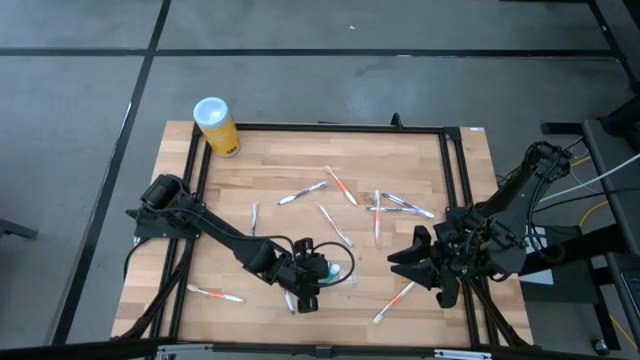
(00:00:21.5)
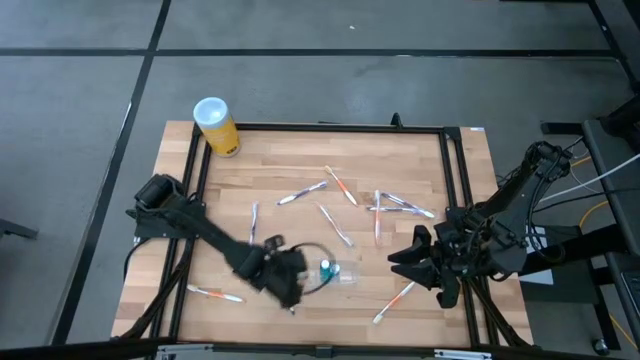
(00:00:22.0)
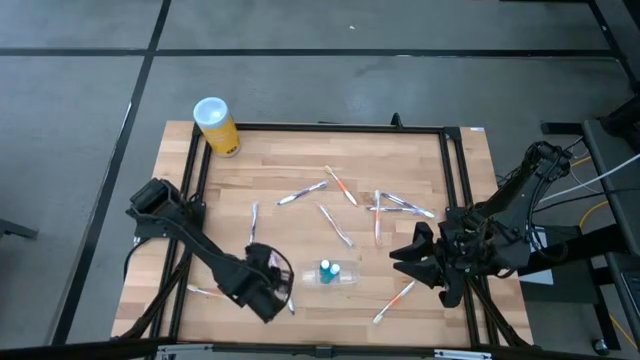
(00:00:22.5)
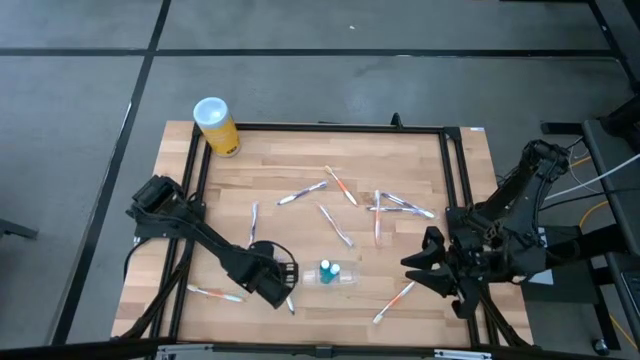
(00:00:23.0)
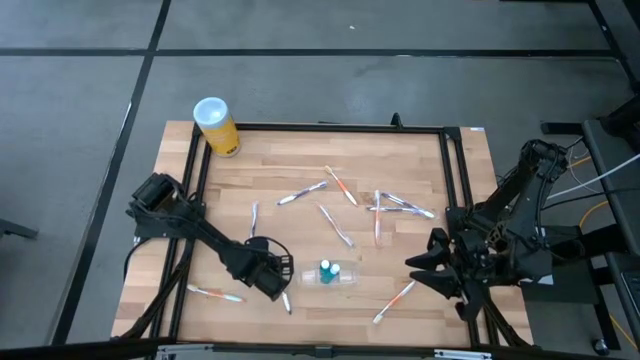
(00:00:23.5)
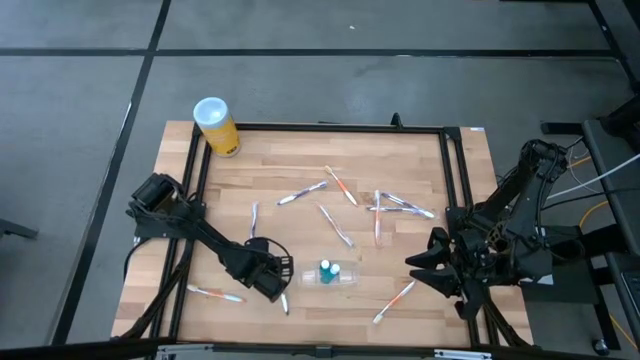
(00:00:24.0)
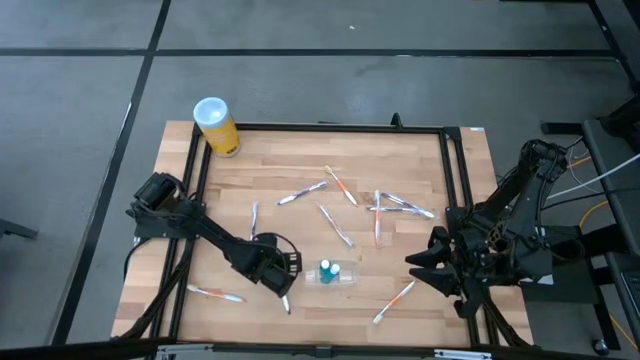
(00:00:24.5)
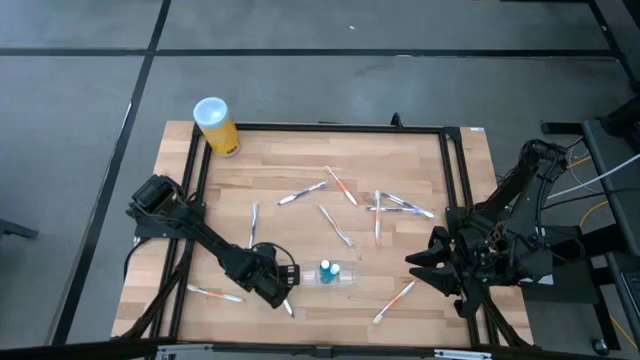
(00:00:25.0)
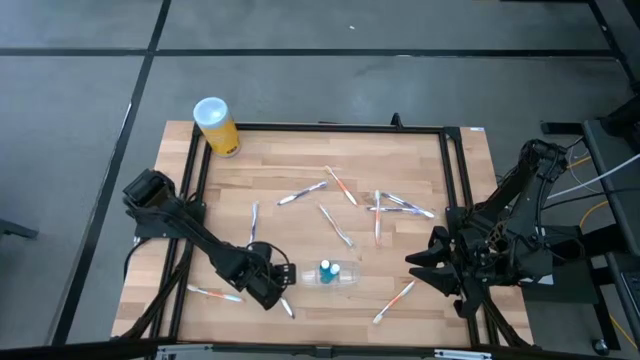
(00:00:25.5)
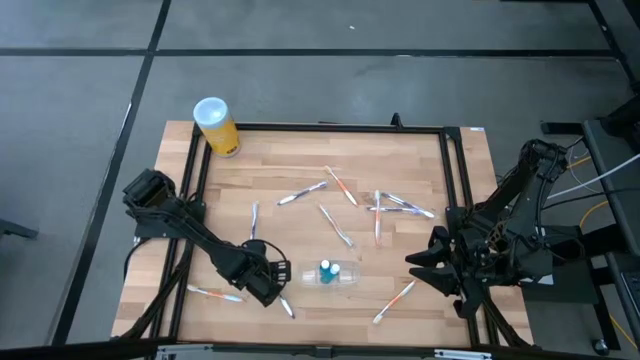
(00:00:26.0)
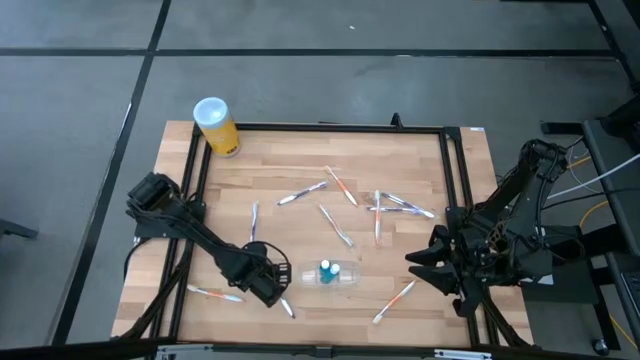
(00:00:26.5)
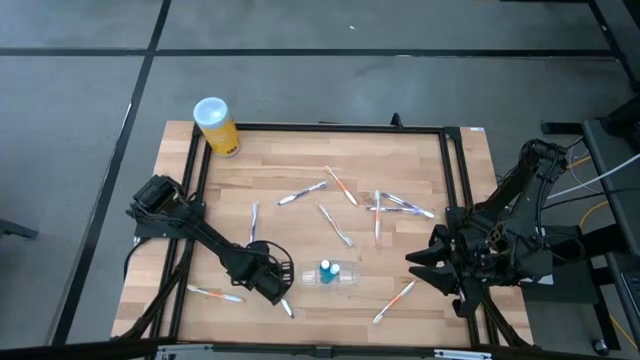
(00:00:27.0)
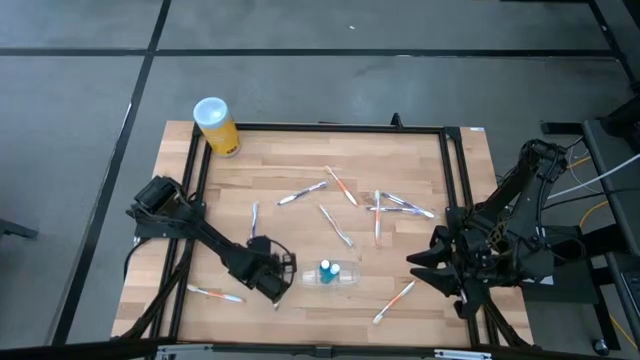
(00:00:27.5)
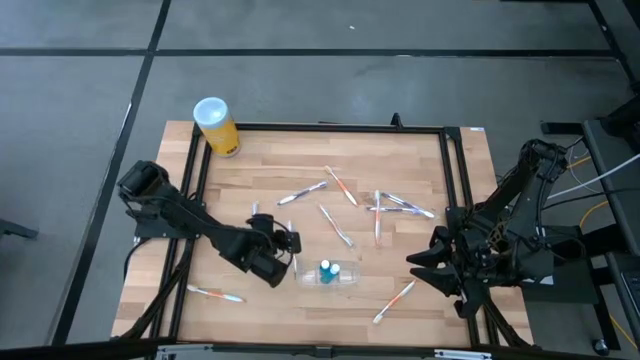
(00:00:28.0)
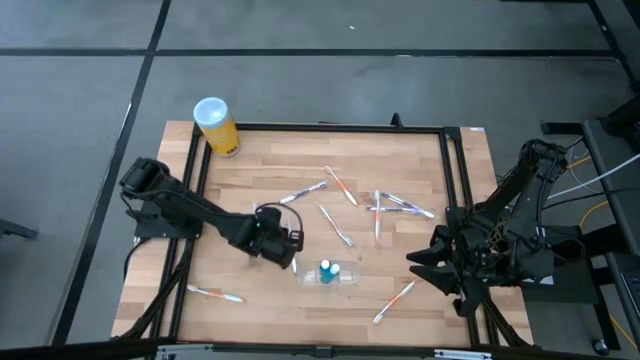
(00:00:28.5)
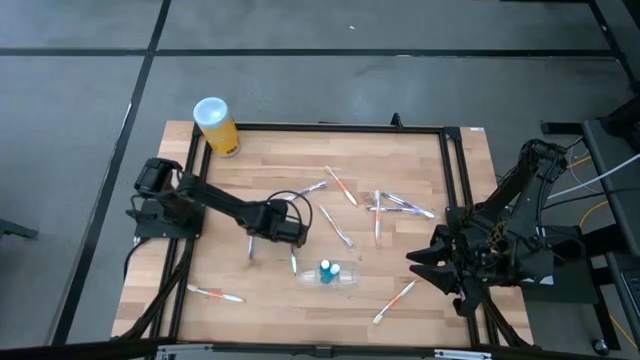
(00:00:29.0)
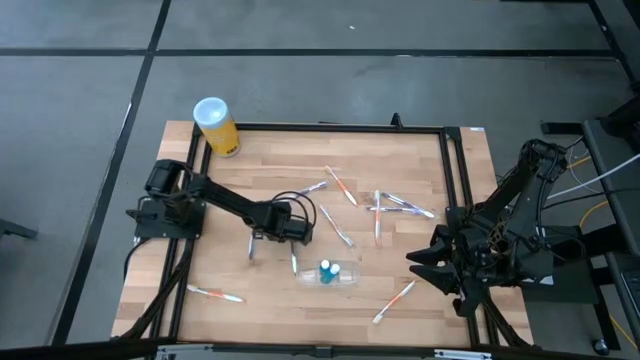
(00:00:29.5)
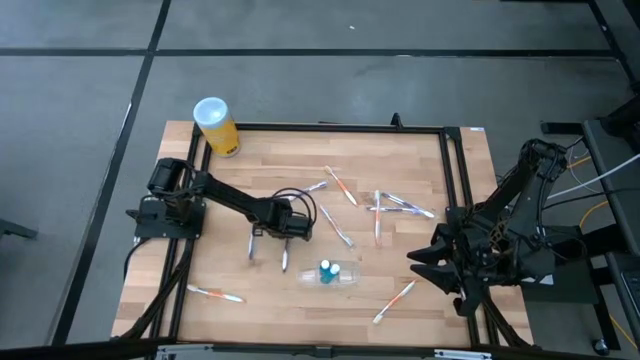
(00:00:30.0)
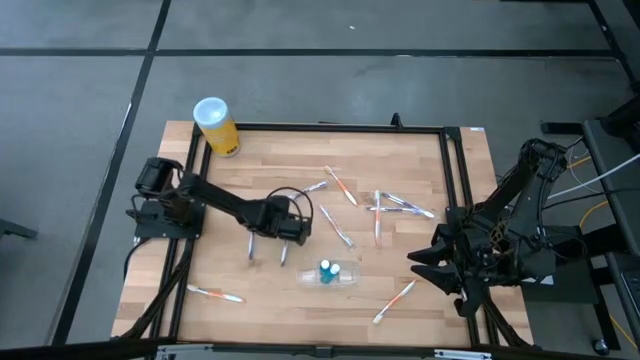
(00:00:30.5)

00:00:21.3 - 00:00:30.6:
Task: Pick & Place toothbrushing station
Put the purple toothbrush into the left section of the transparent organizer

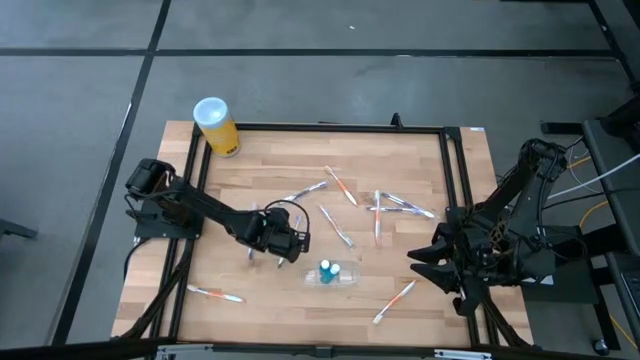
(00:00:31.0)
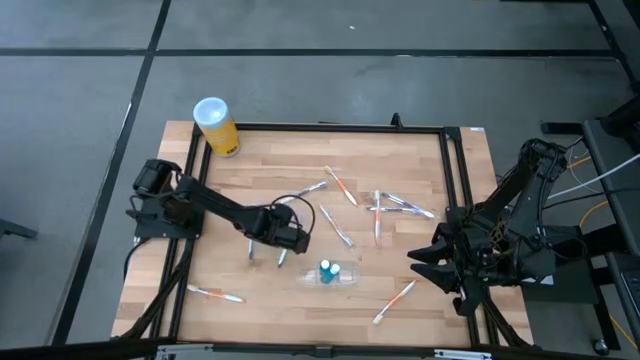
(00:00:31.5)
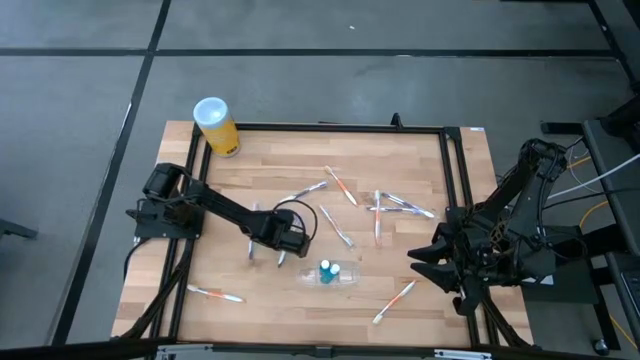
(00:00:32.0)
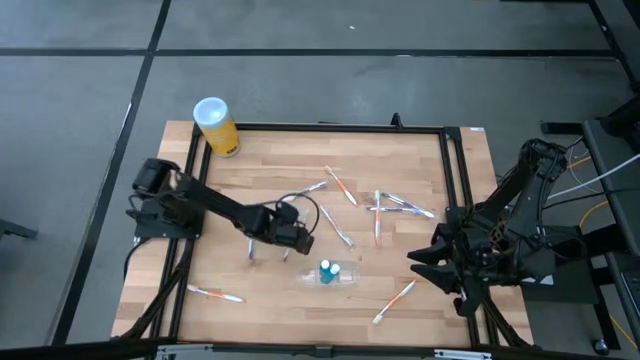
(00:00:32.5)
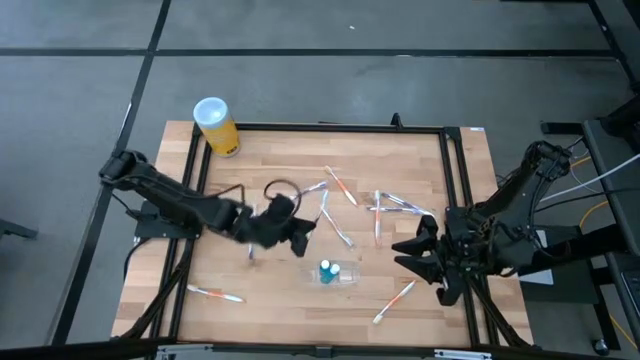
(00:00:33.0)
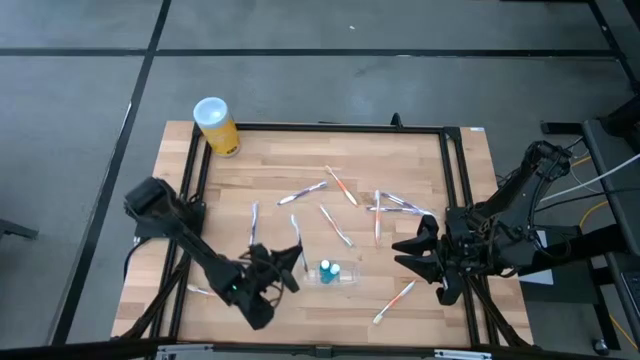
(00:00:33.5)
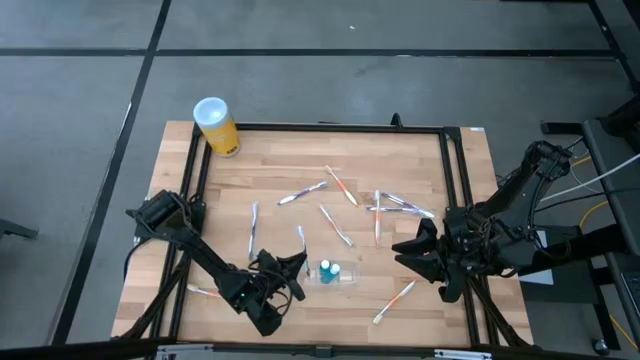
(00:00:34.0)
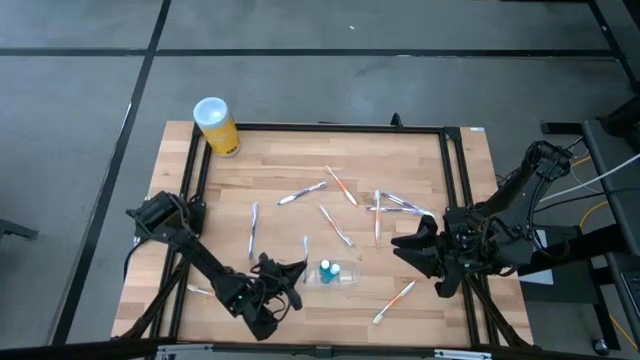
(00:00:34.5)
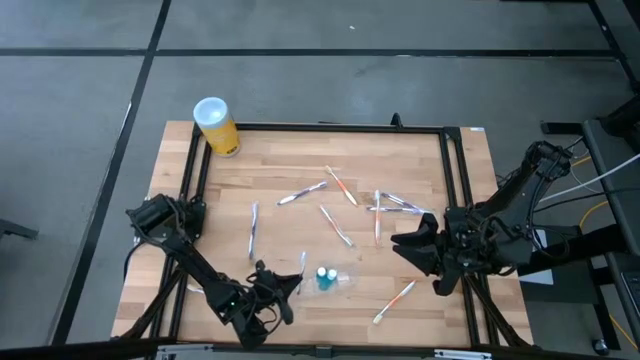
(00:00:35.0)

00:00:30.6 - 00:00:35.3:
Put the purple toothbrush into the left section of the transparent organizer

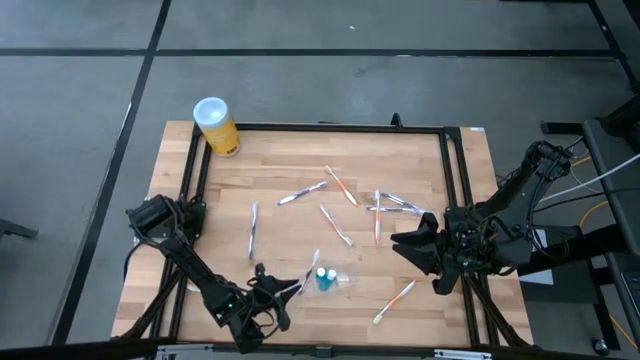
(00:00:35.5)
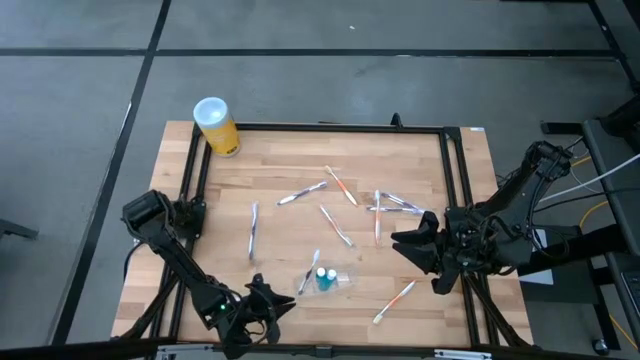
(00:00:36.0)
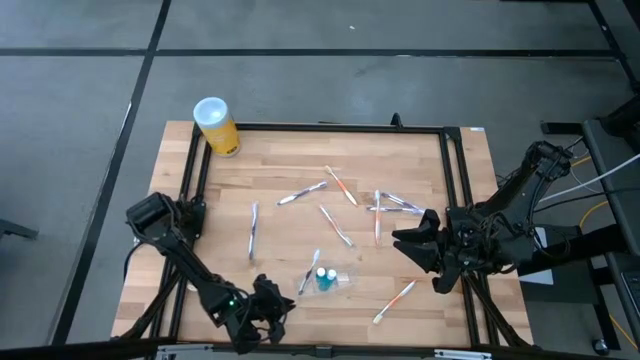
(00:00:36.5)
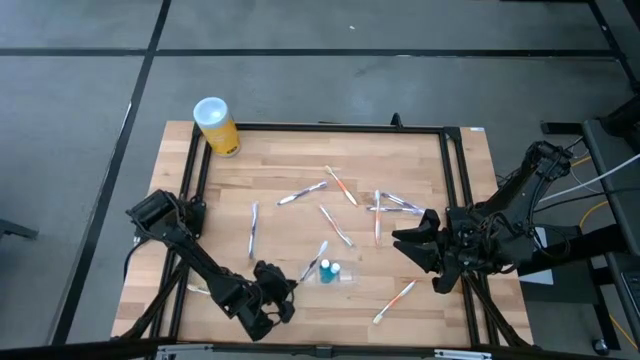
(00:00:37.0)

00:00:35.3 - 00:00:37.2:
Adjust the transparent organizer

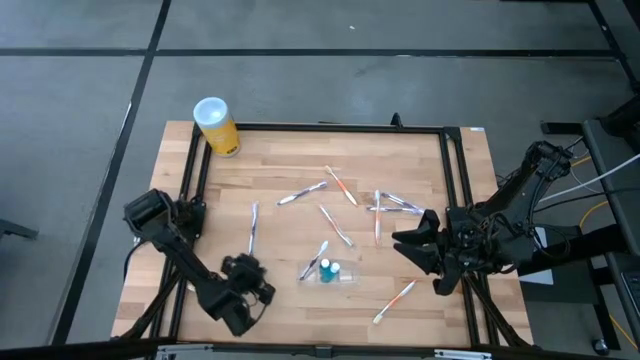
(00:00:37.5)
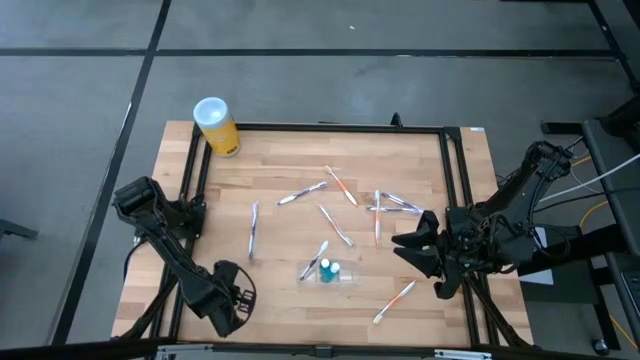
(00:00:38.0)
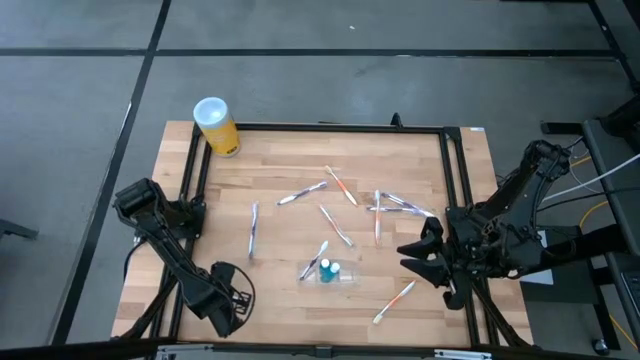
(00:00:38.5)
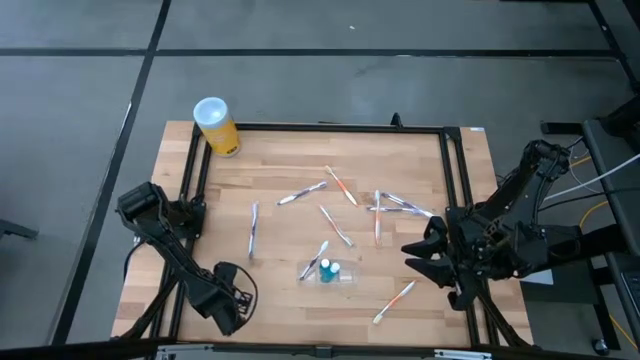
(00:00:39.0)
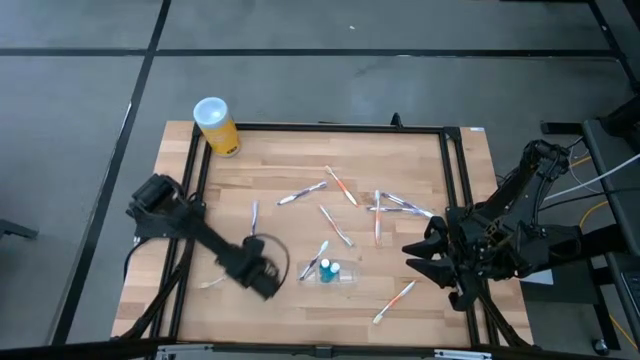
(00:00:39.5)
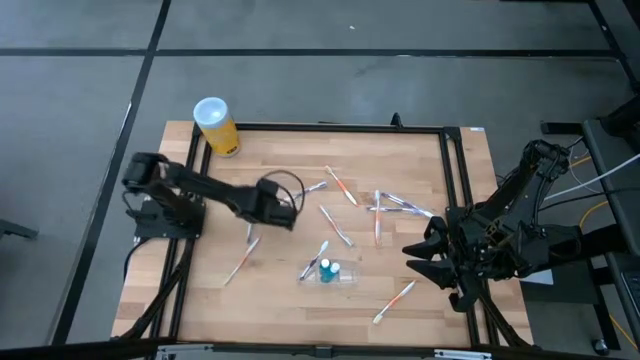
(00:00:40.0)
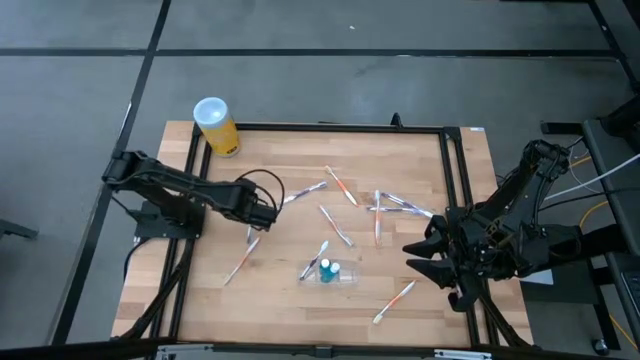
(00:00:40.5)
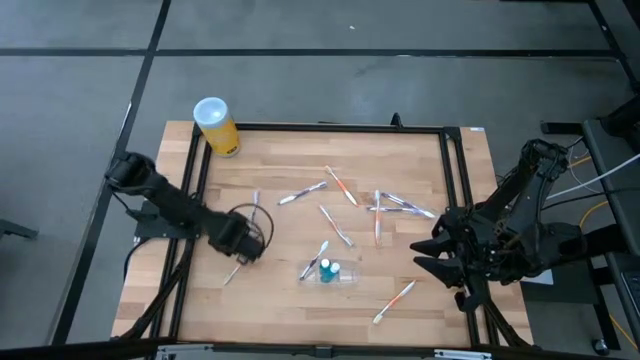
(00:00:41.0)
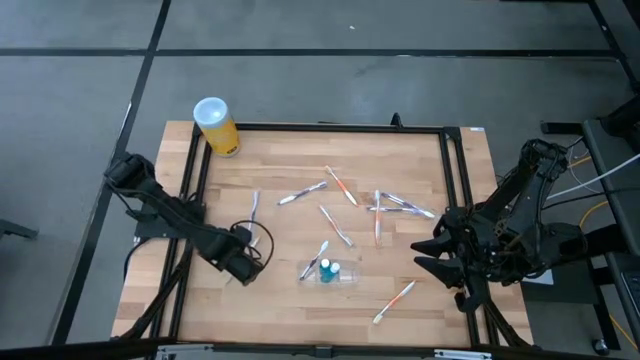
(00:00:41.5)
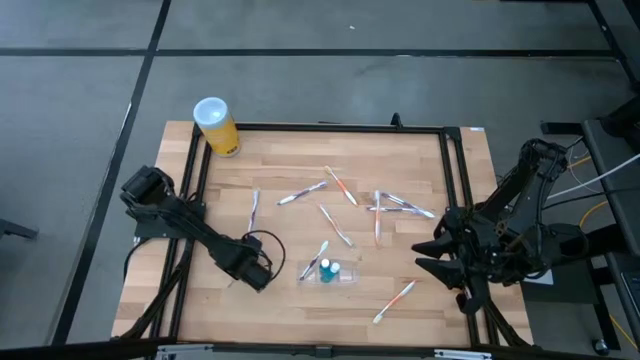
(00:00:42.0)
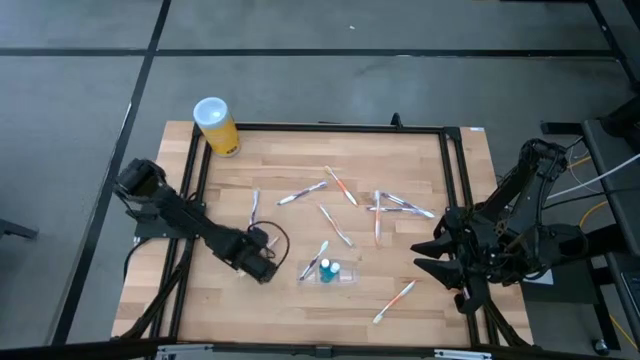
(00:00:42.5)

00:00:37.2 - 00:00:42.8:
Put the orange toothbrush into the right section of the transparent organizer
